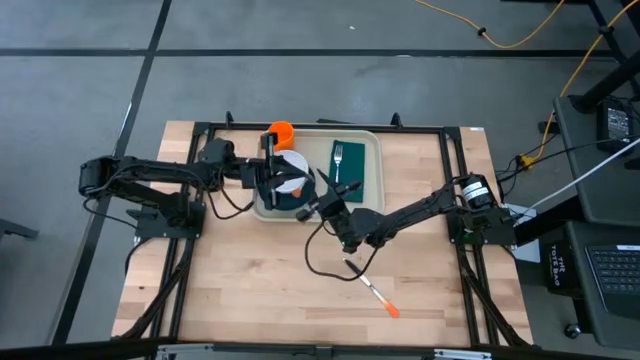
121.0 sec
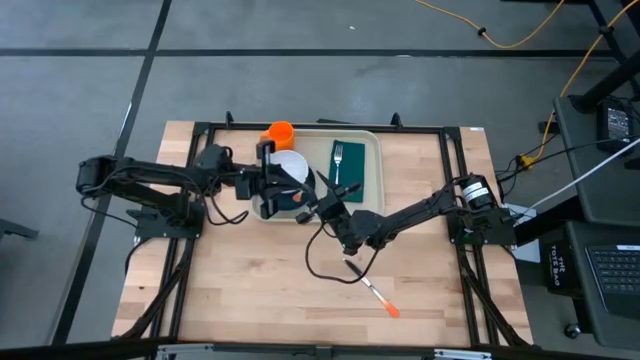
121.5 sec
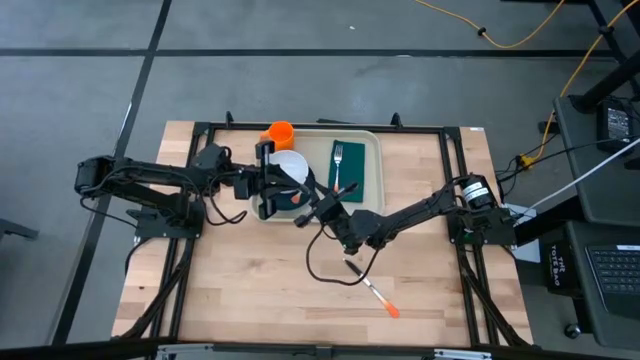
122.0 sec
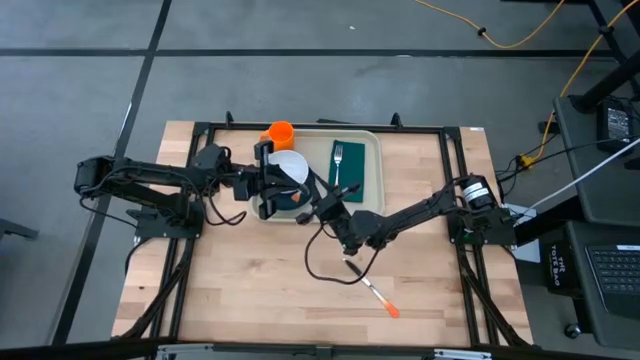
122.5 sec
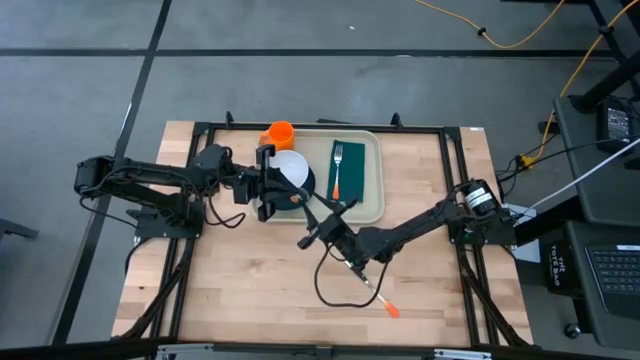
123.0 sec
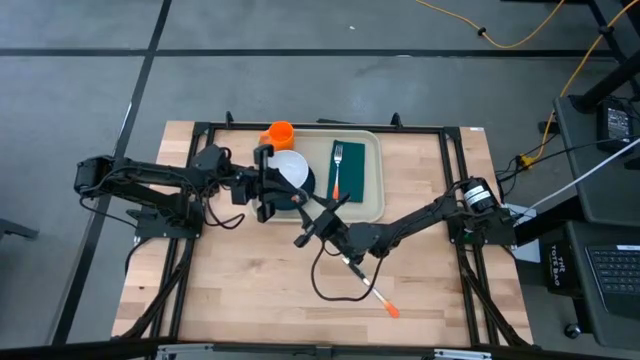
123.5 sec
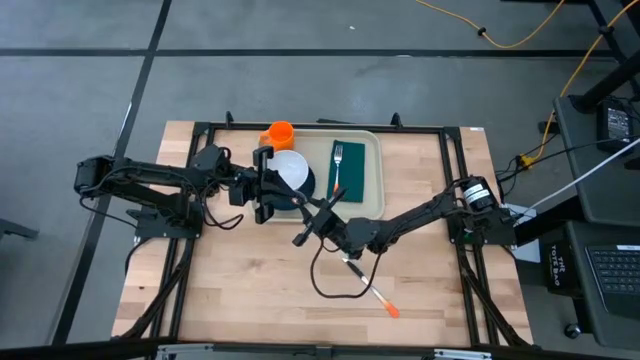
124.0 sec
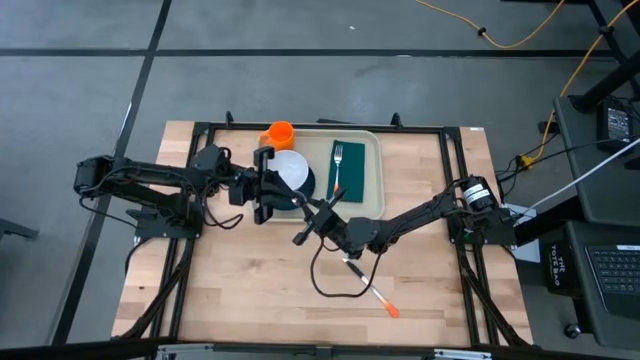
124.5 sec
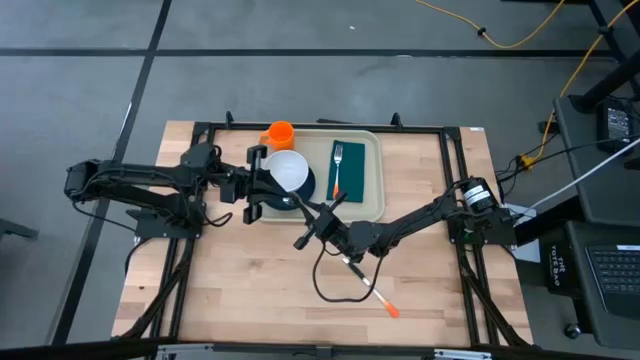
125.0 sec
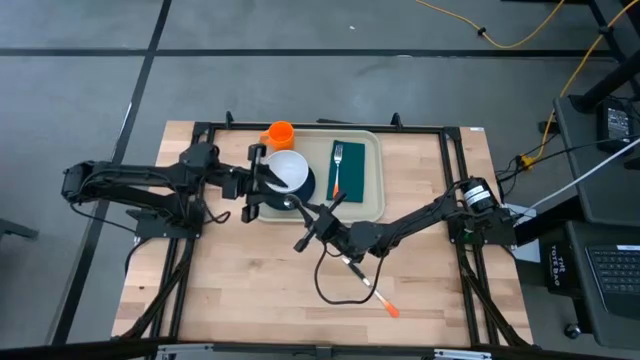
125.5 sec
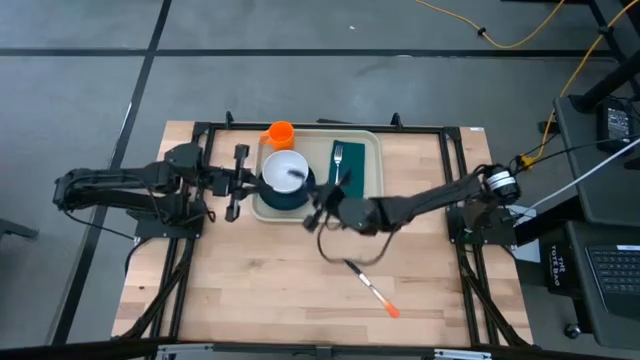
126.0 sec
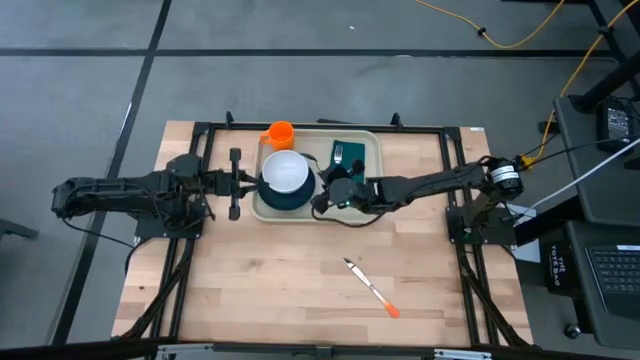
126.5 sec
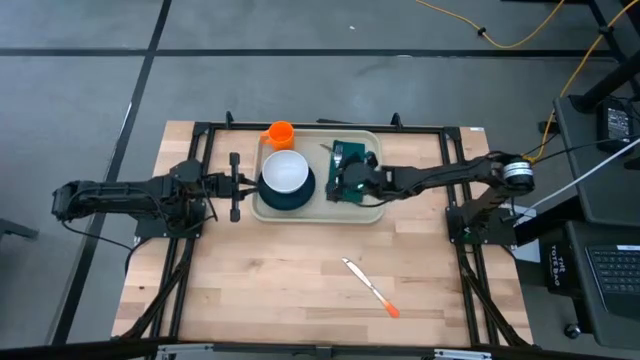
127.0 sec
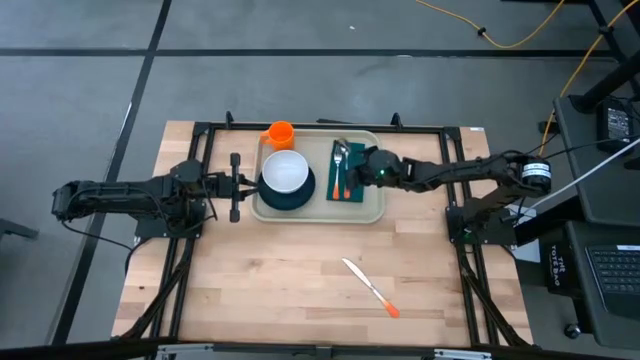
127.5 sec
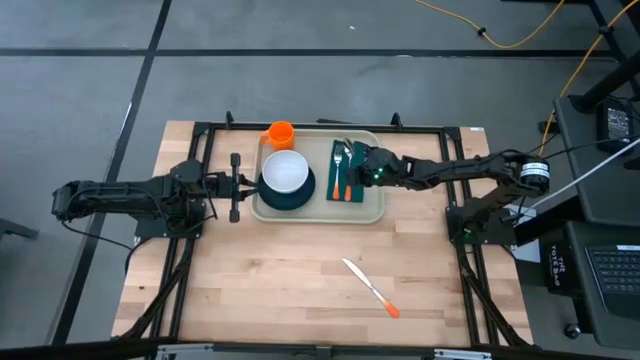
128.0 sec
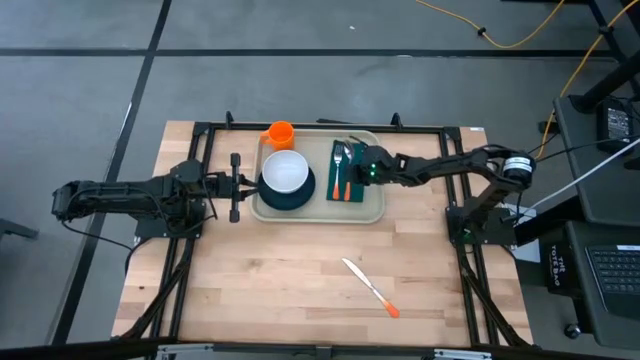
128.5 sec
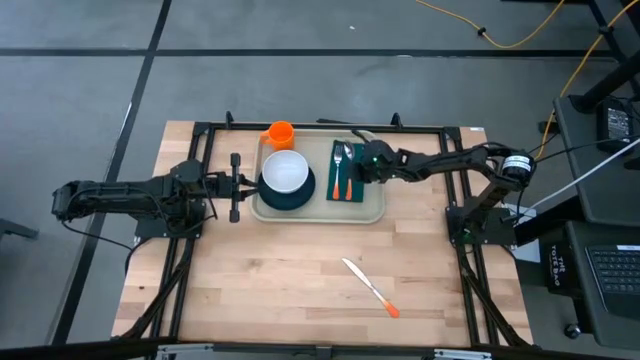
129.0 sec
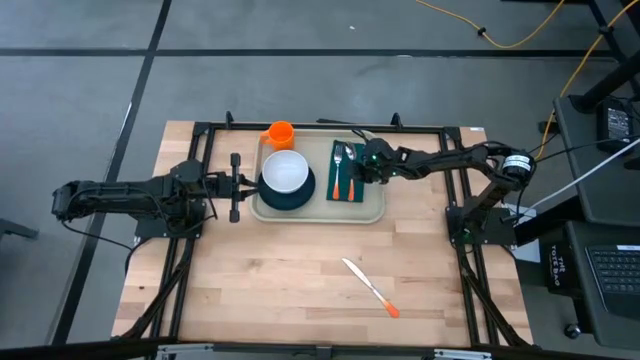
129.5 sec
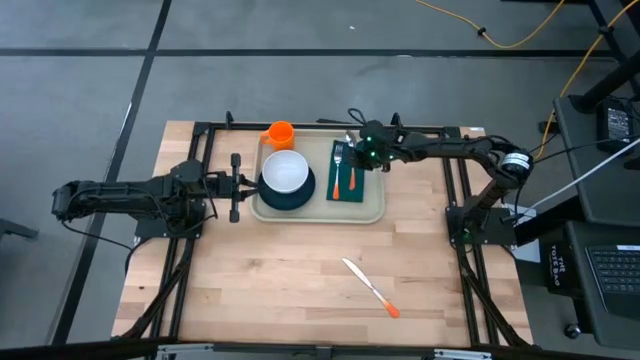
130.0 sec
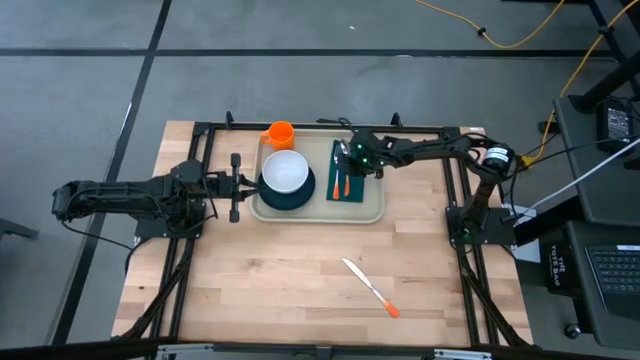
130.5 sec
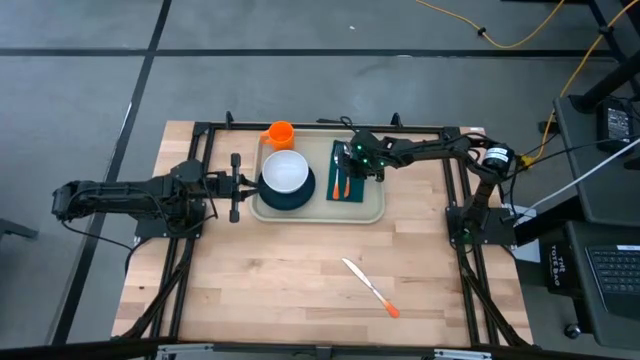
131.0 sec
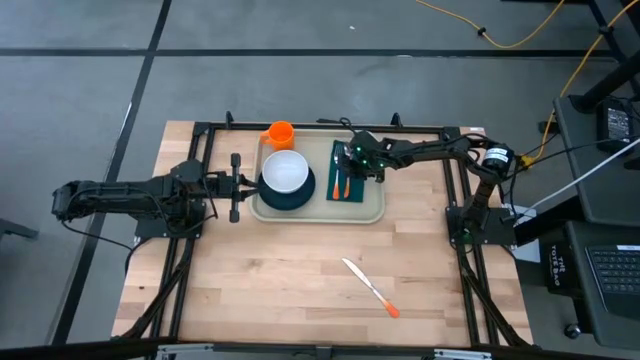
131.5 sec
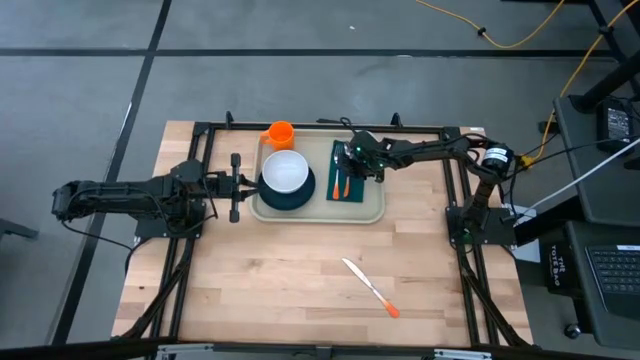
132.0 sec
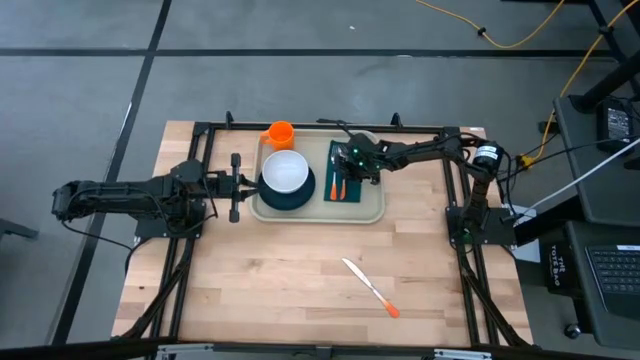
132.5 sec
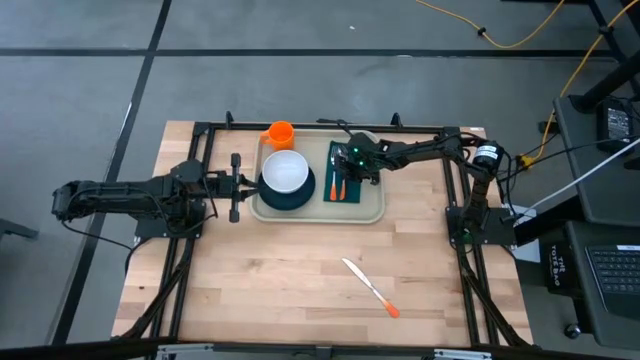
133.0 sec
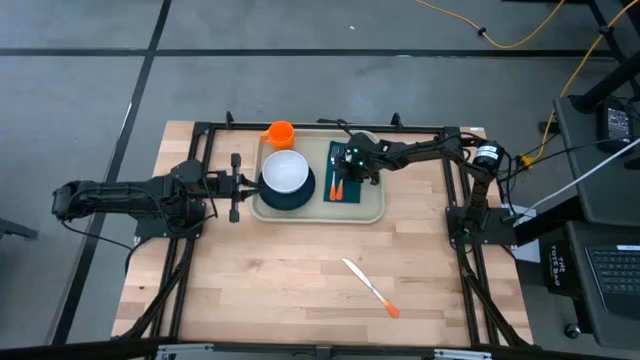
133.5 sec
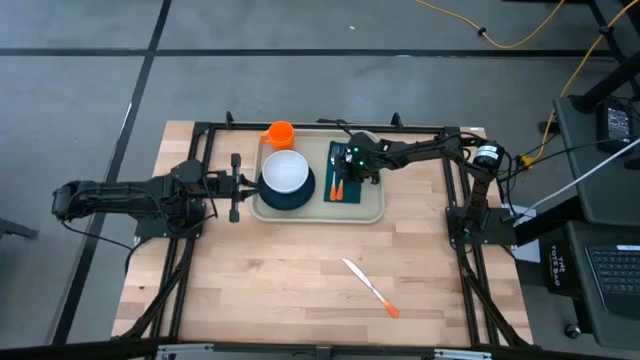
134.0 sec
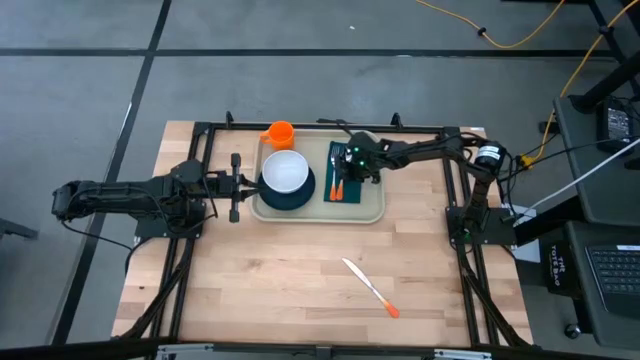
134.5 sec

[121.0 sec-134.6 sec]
Task: Set up tray
Put the orange spoon on top of the green table napkin on the brown serving tray to the right of the orange fork

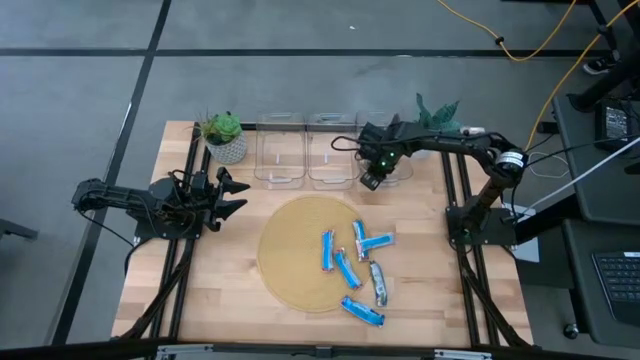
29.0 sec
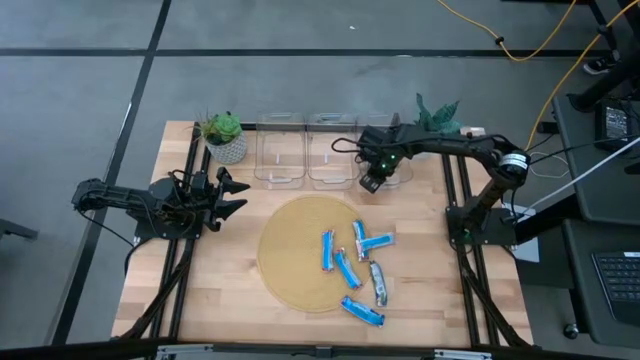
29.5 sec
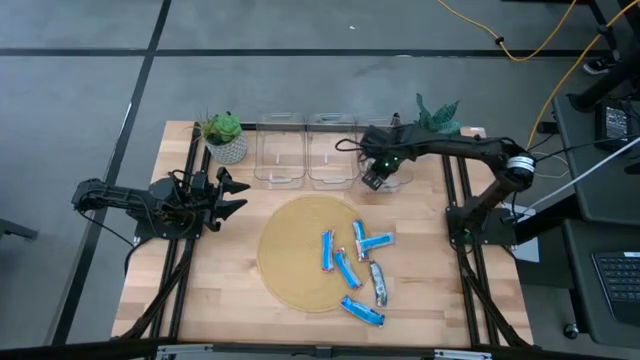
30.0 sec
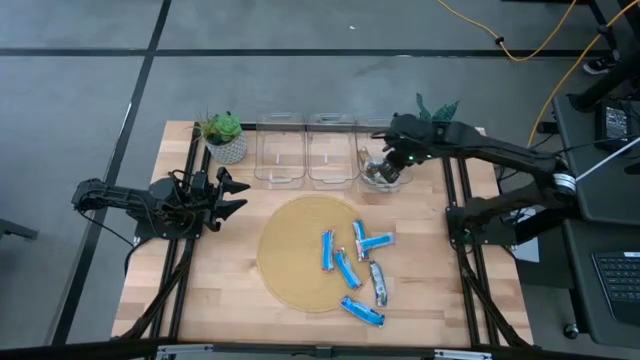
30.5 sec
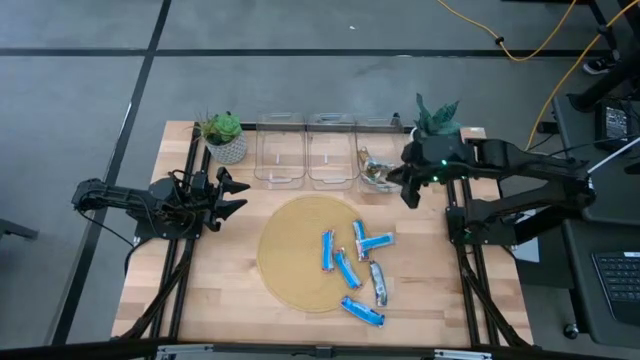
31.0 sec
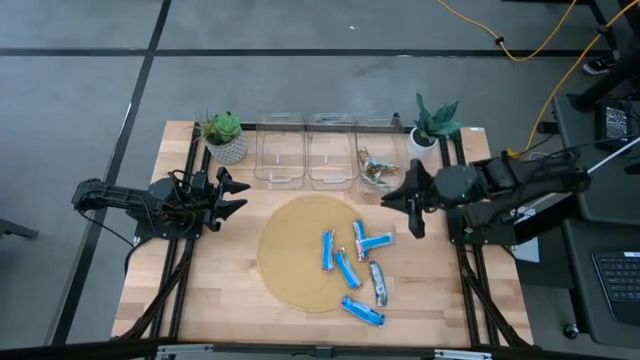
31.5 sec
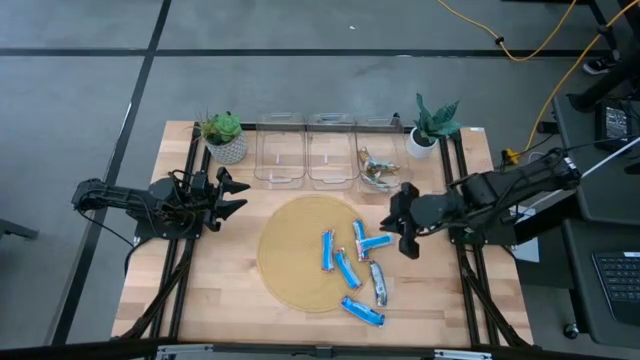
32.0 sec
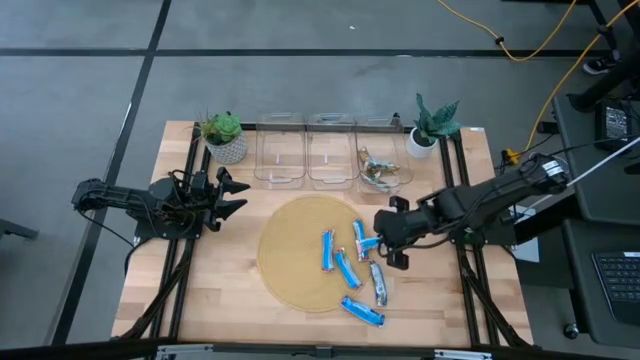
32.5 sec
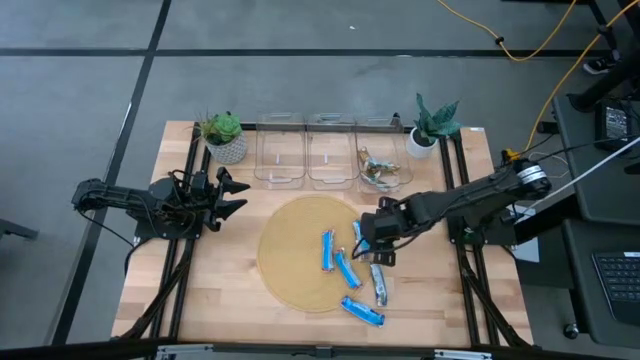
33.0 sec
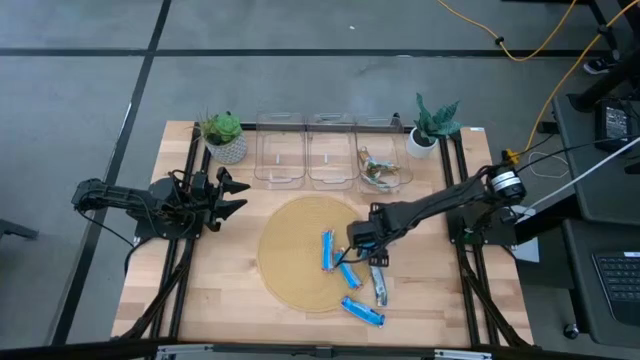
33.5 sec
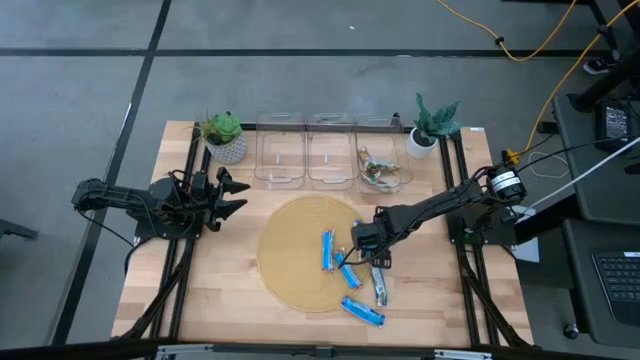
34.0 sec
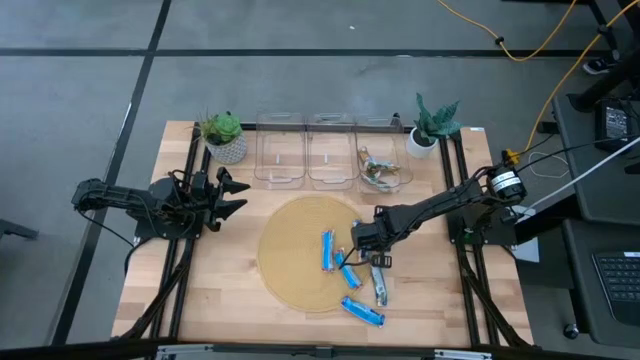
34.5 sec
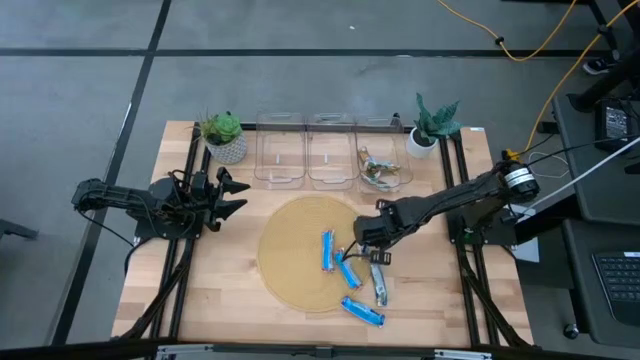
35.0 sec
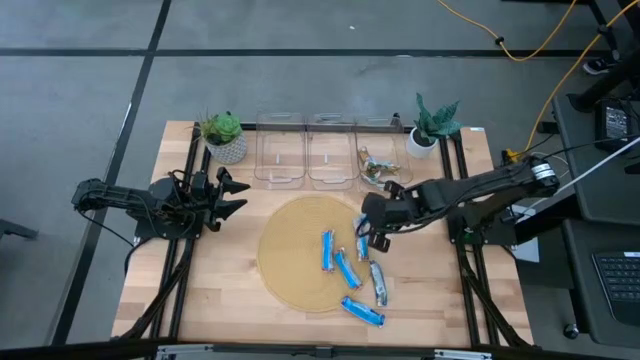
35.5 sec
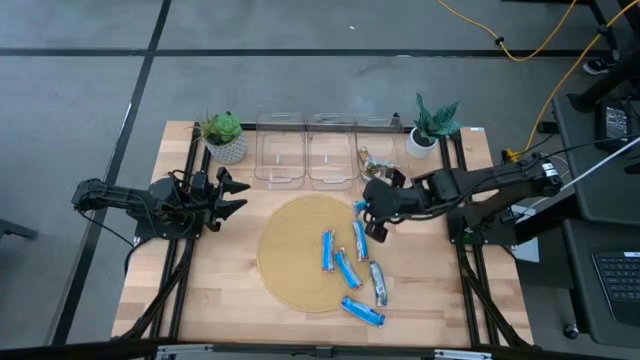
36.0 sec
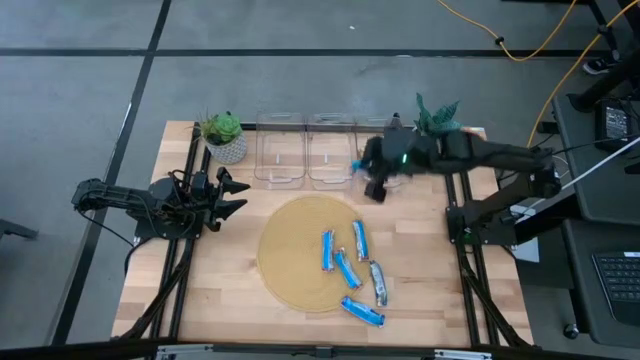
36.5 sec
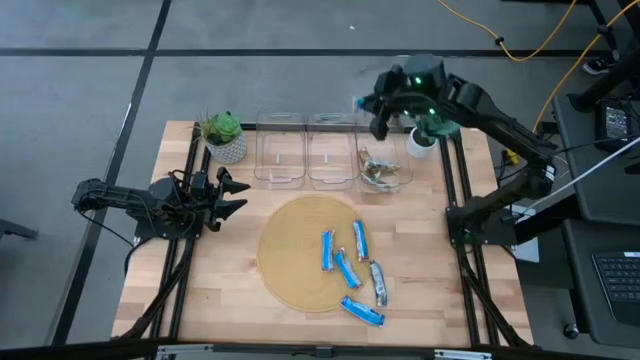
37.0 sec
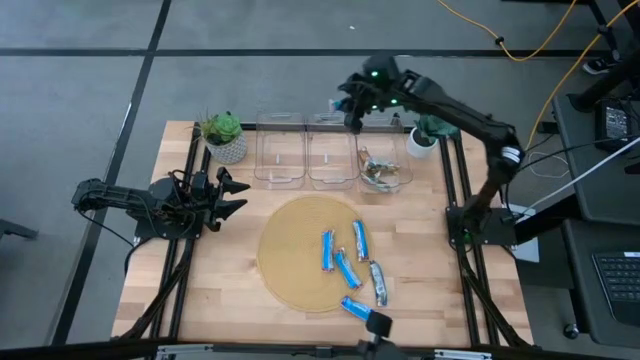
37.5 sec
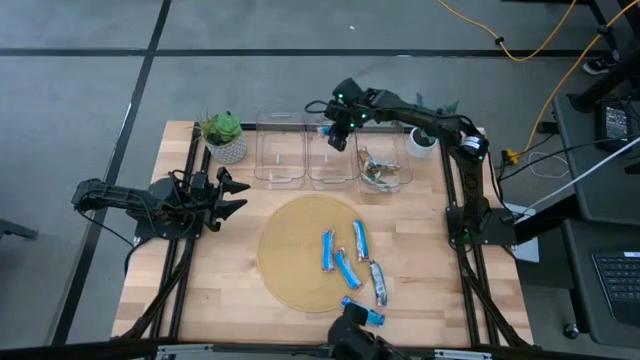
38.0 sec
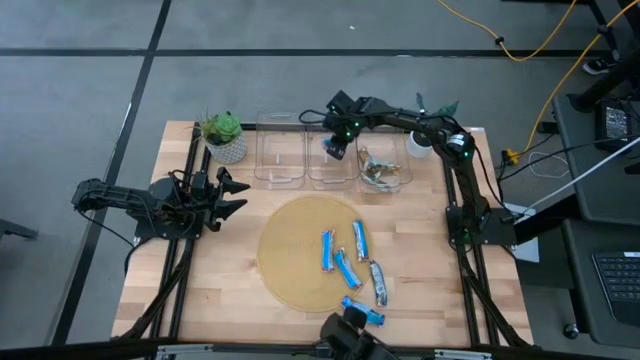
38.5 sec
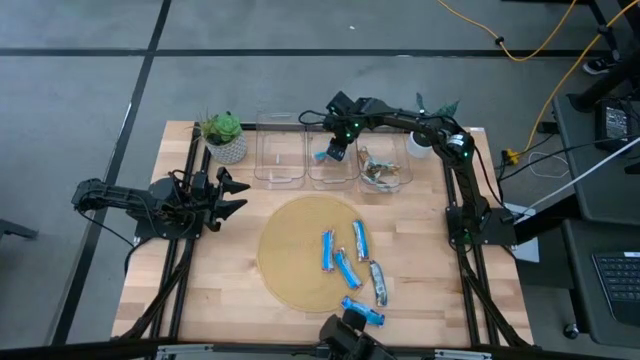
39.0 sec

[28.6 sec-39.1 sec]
Task: Pick and place Granola Bars by type
Put the red granola bar into the middle transparent bin
